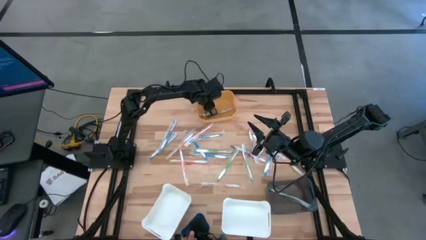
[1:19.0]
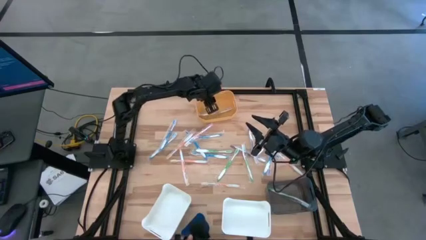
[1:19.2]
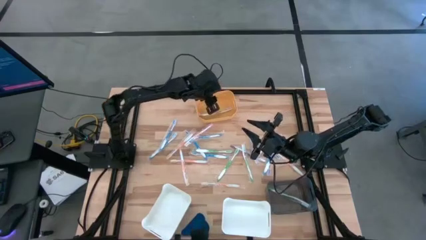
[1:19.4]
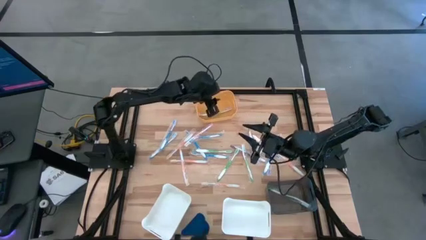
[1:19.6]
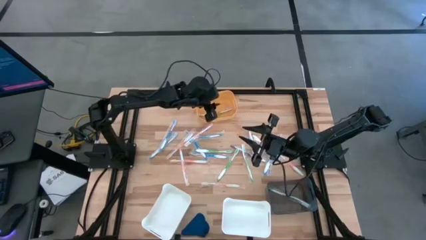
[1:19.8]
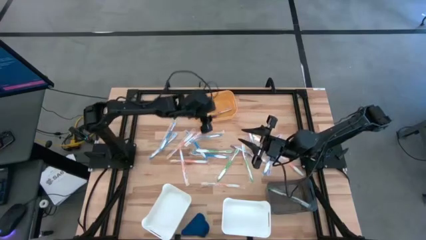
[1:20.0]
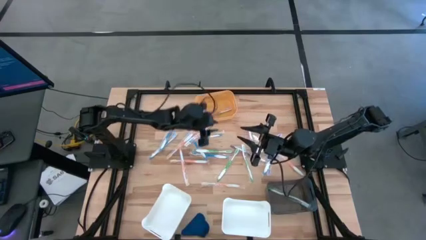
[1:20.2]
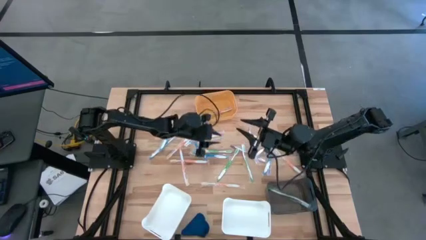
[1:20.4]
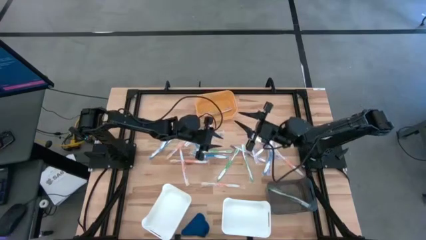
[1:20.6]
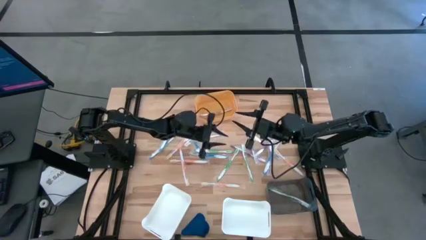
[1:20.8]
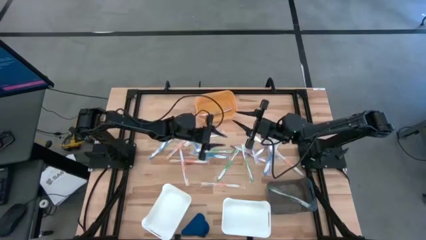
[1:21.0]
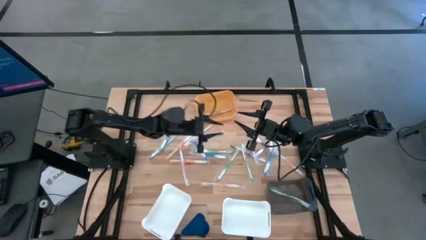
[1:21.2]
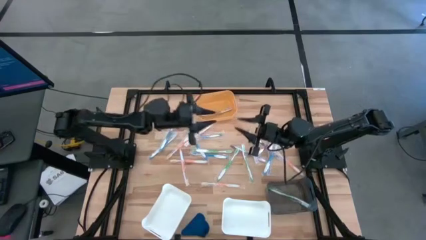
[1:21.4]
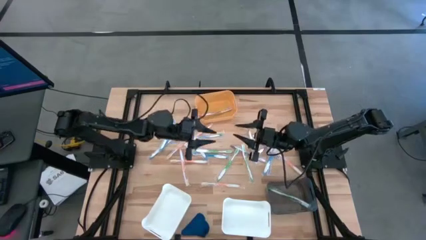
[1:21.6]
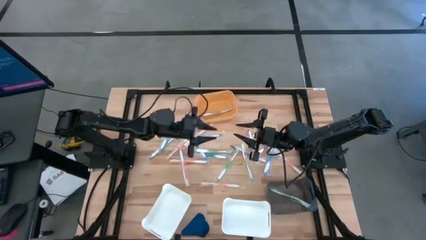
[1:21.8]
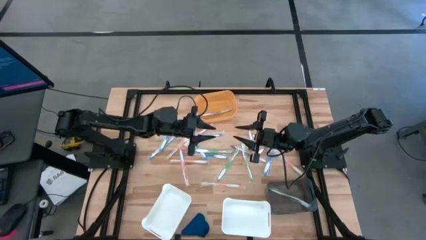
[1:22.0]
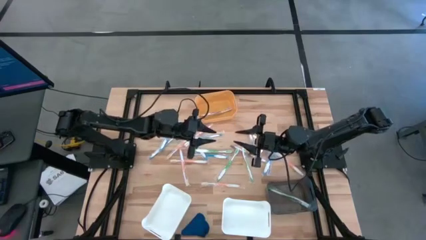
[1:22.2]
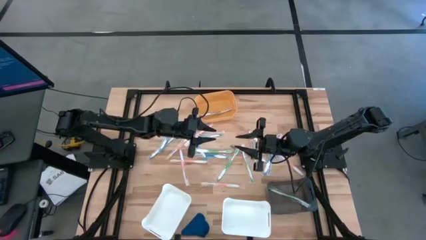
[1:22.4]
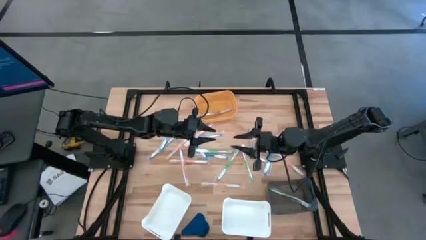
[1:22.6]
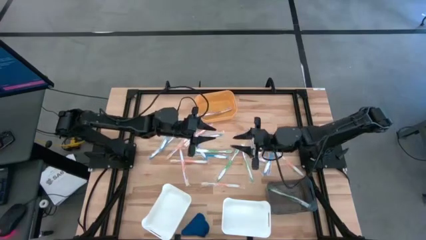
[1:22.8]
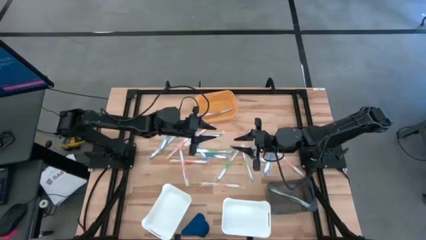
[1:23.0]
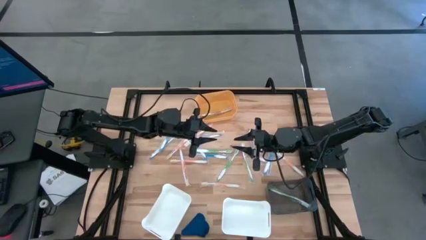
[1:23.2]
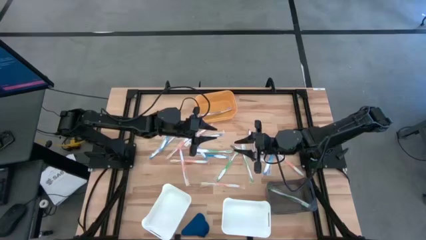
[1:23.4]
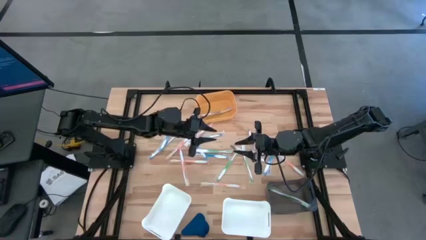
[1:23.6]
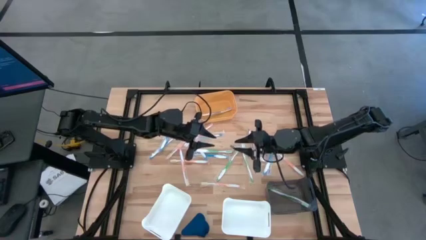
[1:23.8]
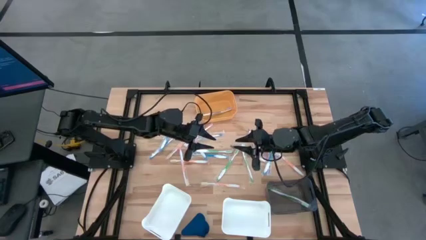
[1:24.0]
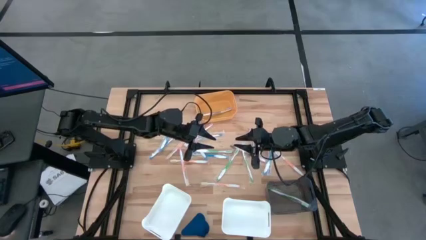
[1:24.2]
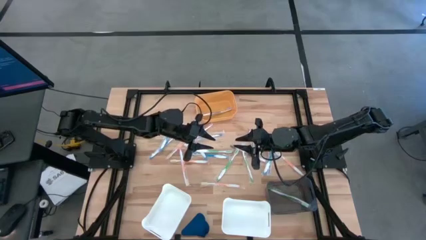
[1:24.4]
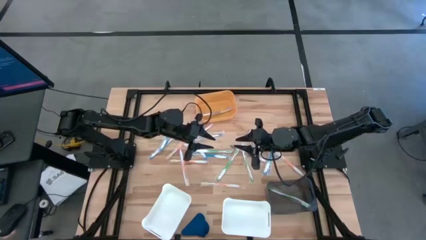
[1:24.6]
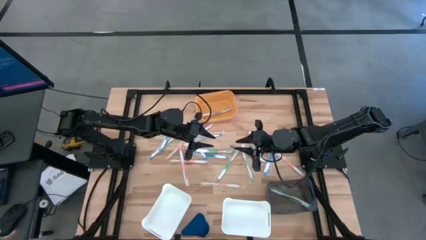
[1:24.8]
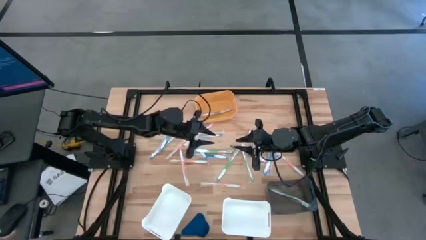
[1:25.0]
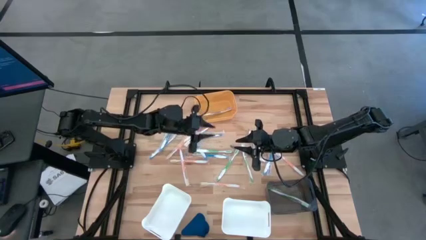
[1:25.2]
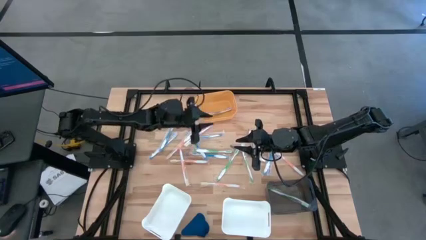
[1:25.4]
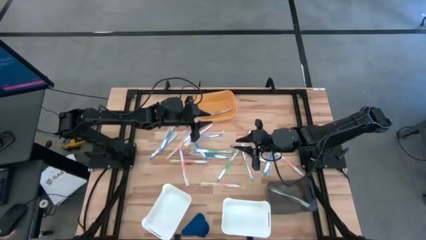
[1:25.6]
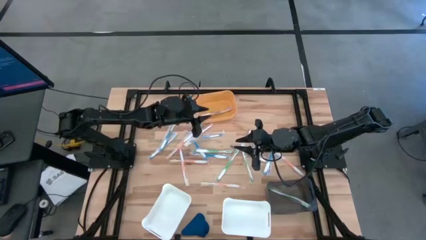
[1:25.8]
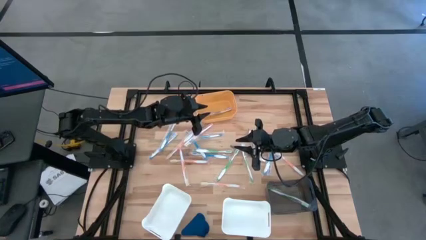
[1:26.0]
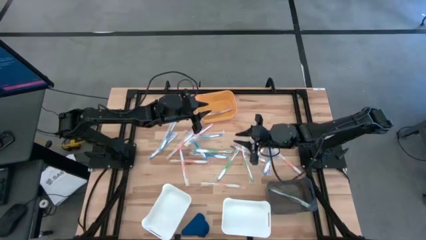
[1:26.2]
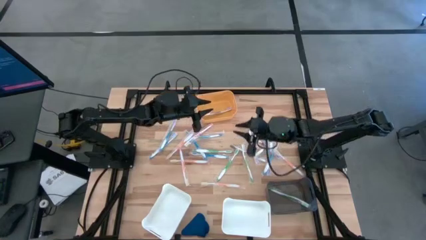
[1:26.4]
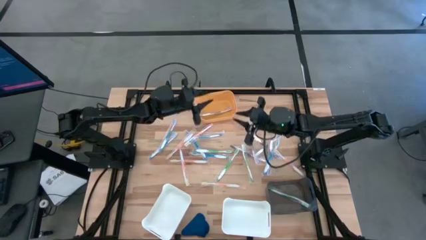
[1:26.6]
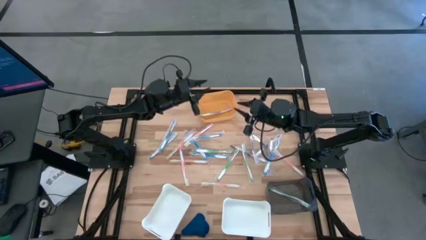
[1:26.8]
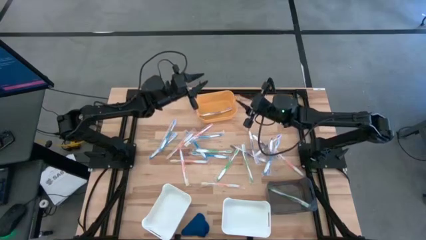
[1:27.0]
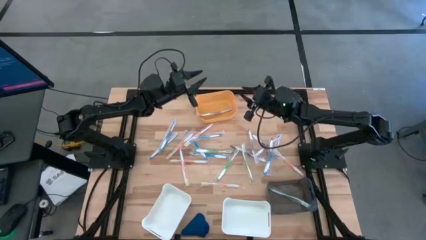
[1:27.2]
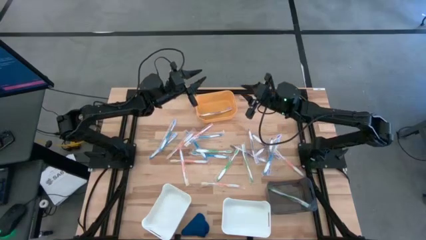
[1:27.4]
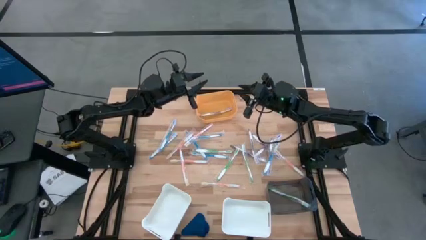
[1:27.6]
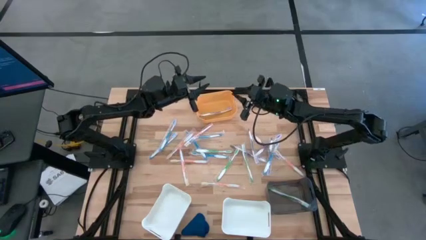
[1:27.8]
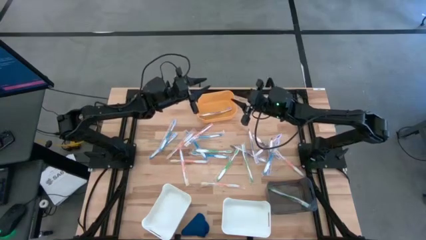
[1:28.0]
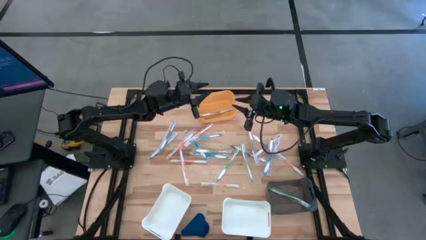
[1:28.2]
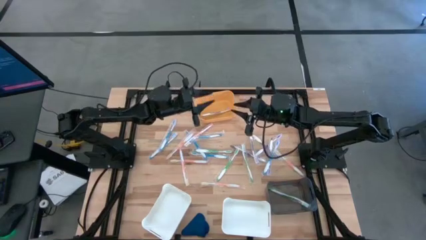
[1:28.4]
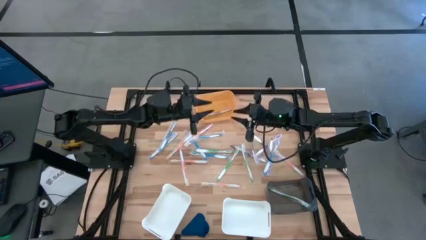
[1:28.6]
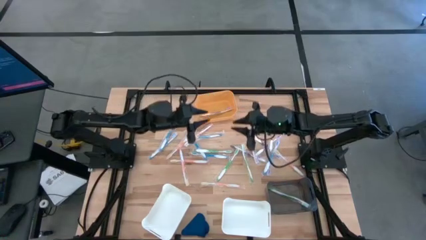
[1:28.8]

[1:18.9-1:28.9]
Task: Pick & Place Toothbrushes
Put the blue toothbrush into the left white bin

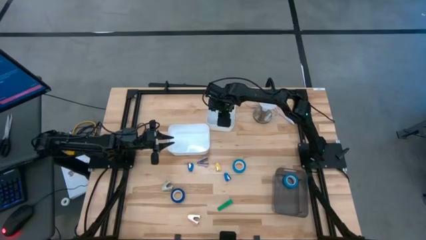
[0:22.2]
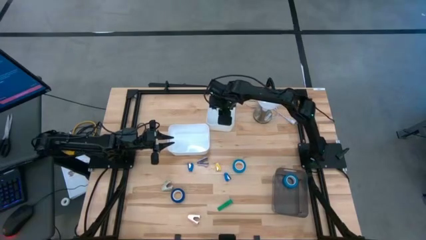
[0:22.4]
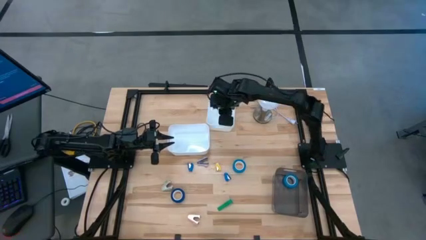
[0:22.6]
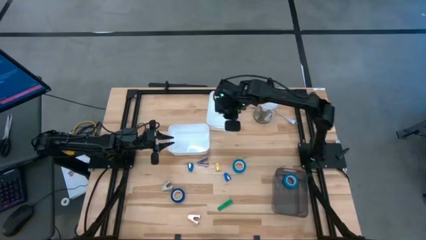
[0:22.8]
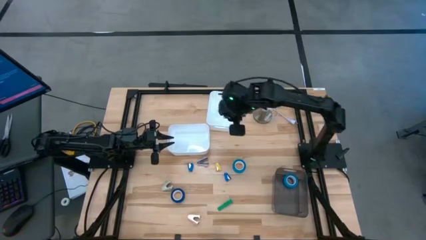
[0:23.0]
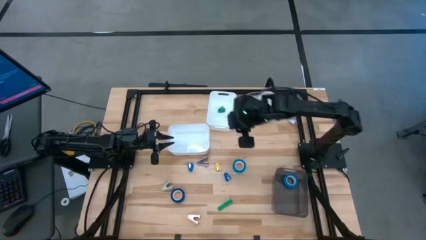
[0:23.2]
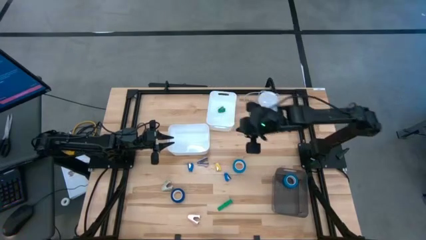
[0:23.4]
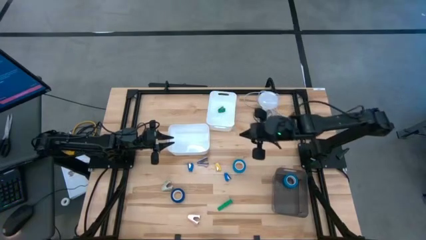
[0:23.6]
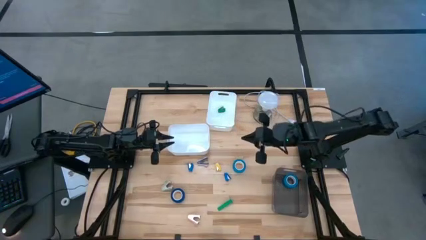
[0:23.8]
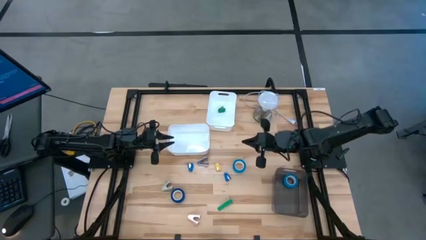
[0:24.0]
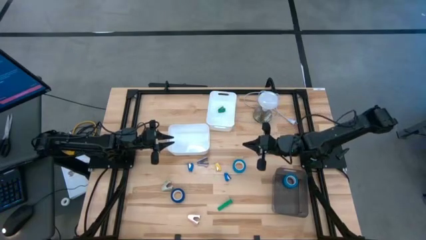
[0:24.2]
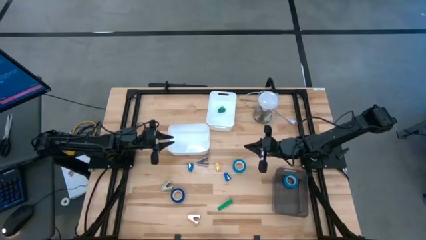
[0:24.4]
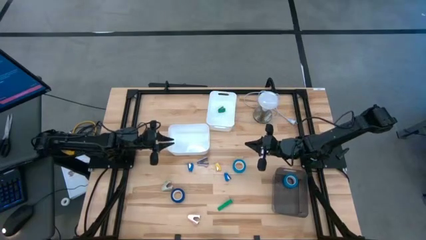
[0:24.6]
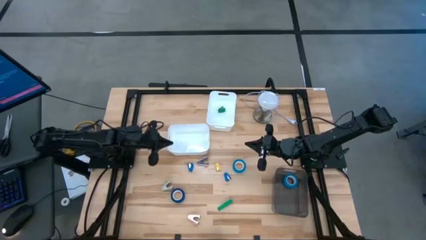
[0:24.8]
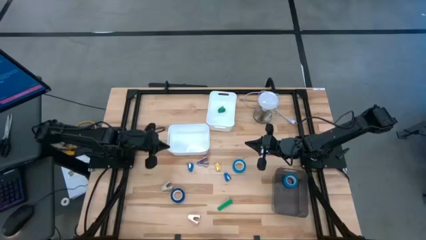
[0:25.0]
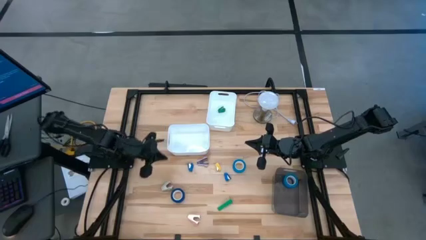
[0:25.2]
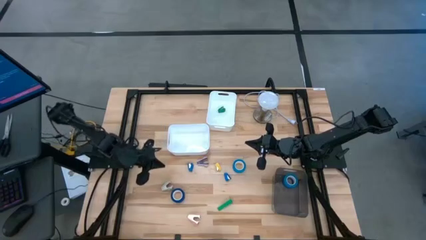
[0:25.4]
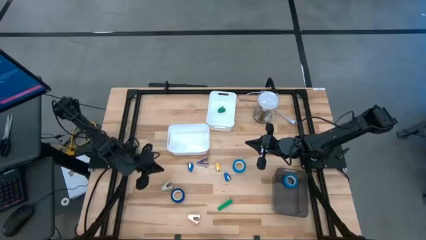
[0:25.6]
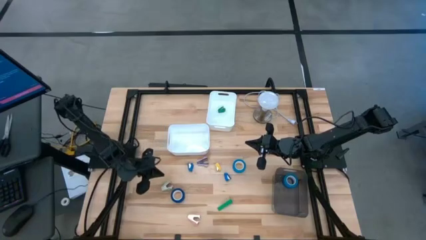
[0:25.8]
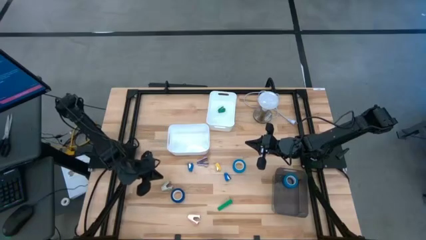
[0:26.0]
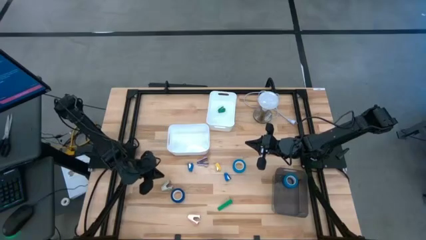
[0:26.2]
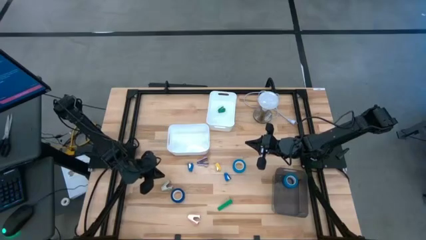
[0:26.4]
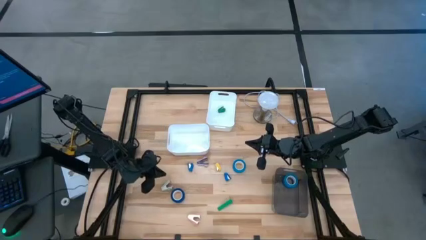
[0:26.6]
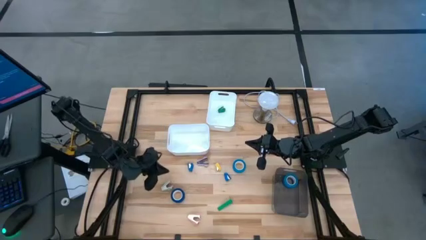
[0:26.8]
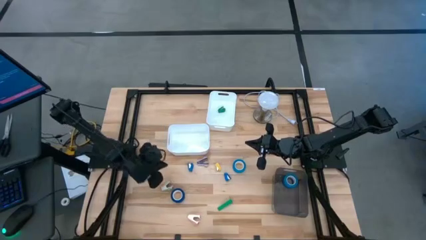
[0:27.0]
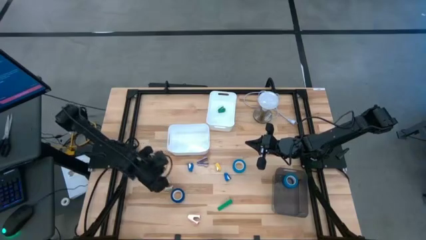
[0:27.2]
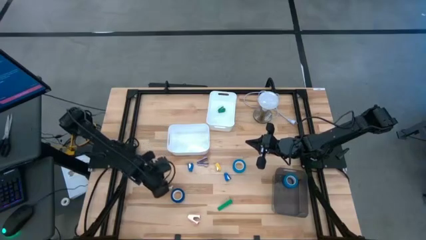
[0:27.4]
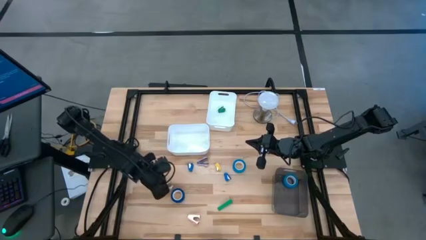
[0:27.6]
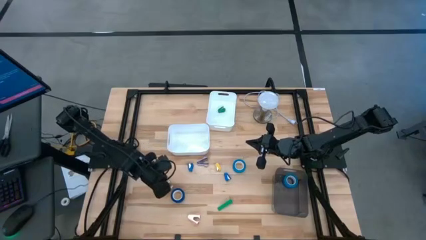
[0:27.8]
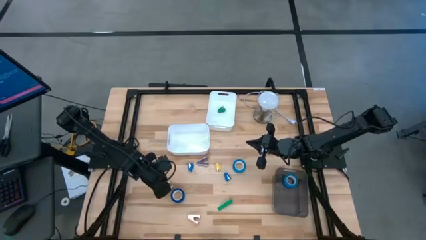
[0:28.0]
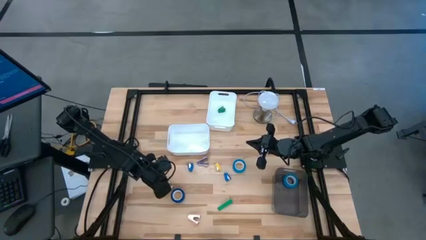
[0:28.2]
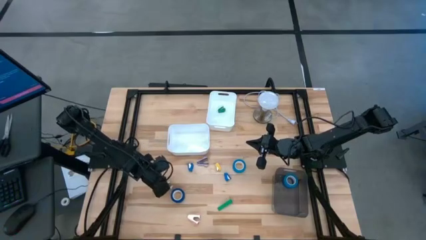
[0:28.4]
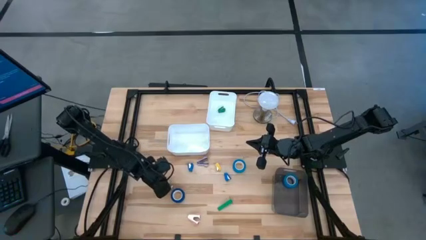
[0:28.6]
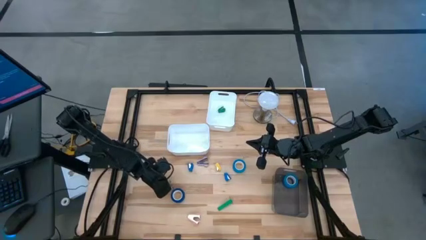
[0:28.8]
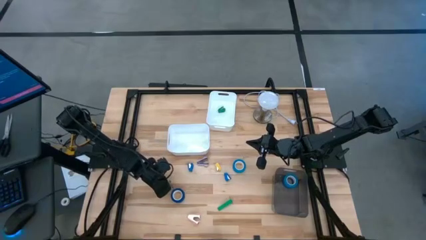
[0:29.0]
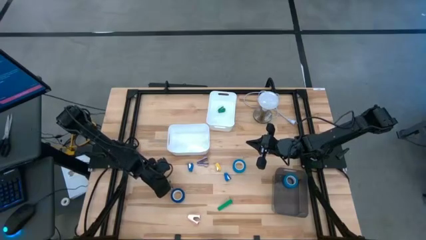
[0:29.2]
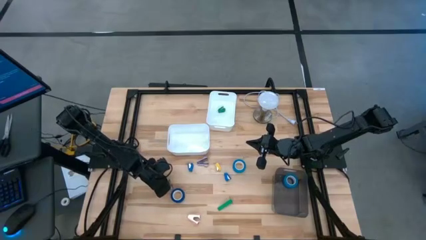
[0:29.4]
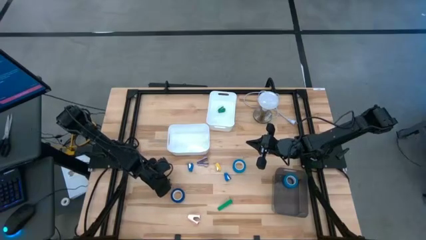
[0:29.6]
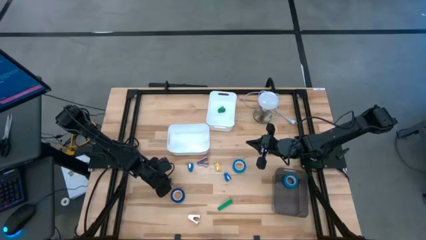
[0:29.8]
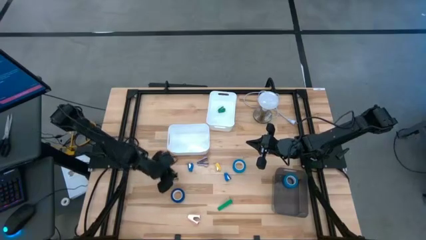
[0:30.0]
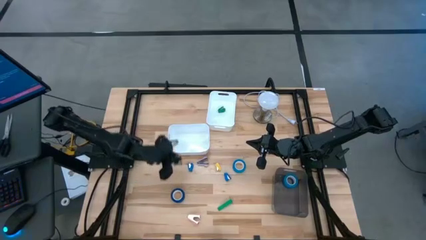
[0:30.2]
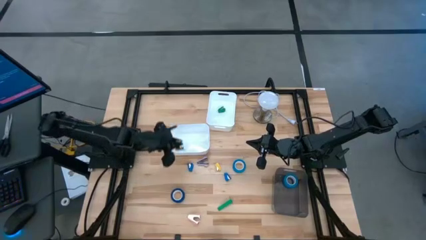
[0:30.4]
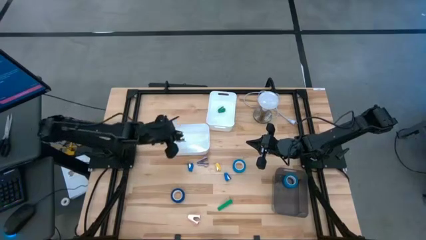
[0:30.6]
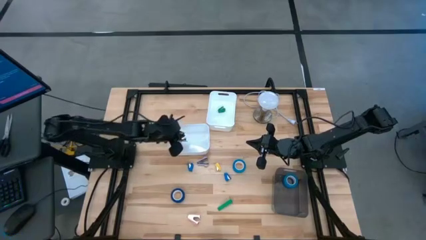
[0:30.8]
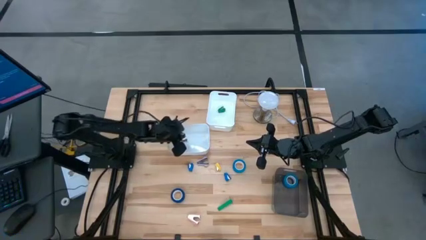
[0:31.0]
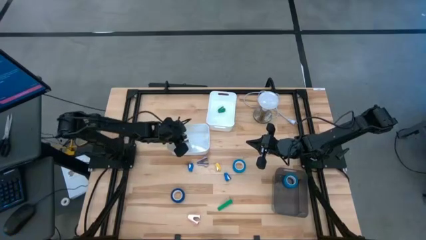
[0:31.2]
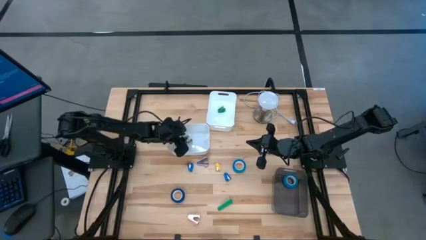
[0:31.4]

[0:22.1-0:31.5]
Task: Pick and place Stapler, Stapler remover, tape
Put the gray staple remover into the bottom white bin
